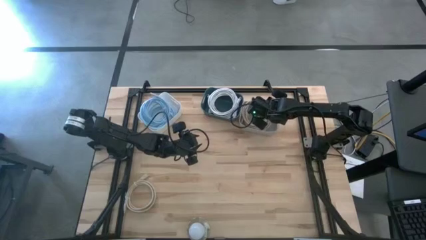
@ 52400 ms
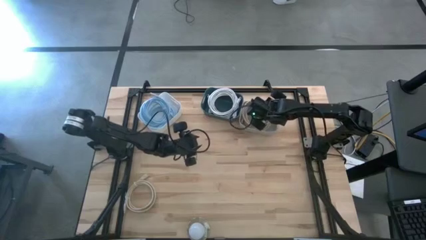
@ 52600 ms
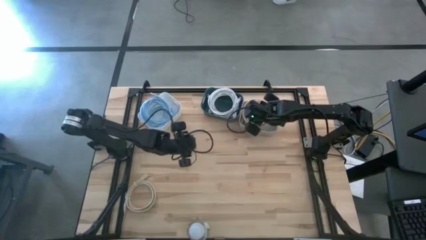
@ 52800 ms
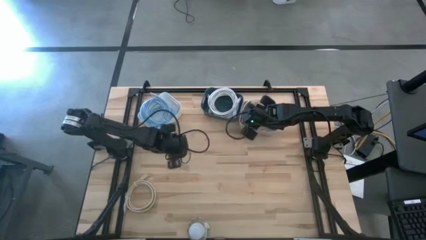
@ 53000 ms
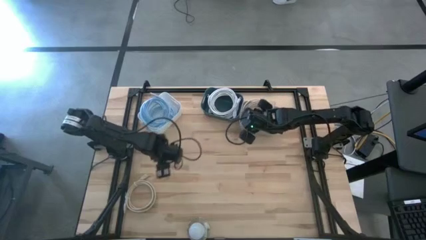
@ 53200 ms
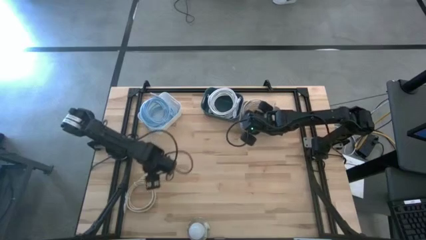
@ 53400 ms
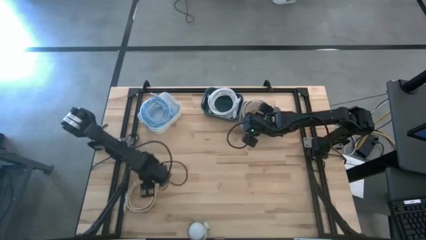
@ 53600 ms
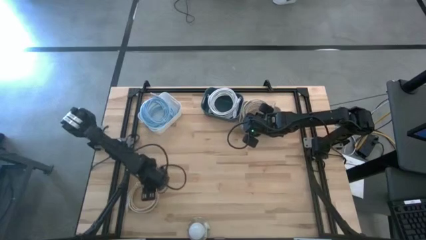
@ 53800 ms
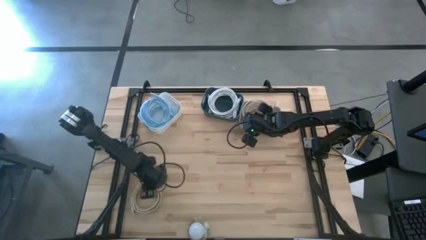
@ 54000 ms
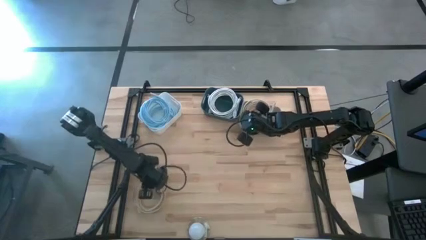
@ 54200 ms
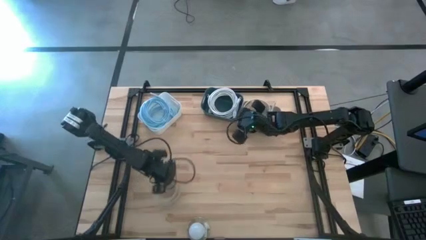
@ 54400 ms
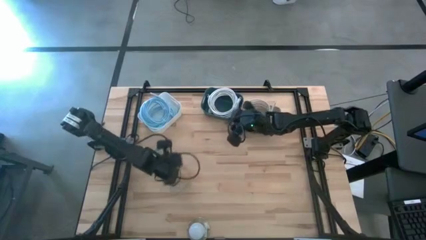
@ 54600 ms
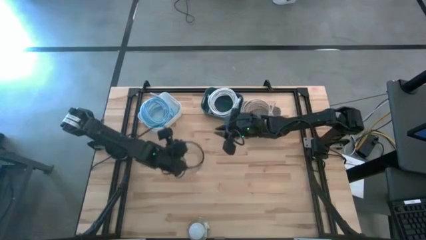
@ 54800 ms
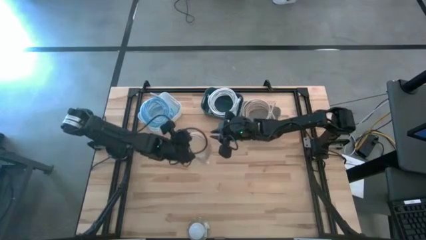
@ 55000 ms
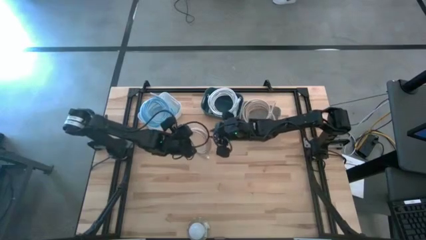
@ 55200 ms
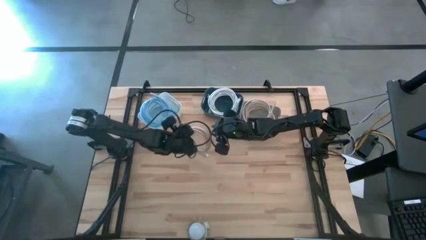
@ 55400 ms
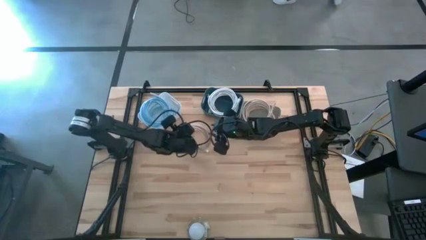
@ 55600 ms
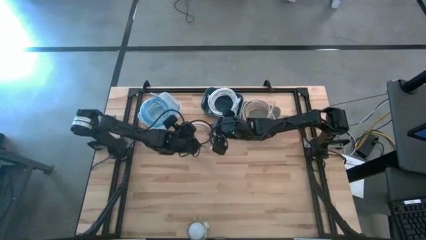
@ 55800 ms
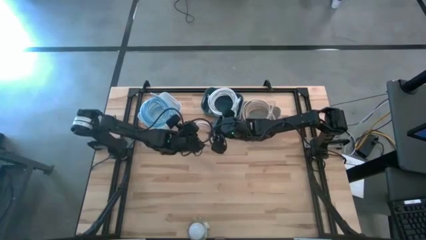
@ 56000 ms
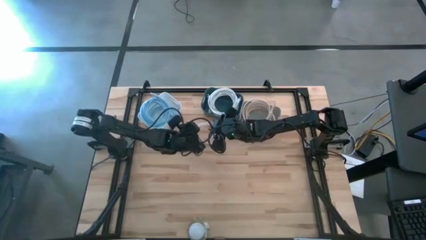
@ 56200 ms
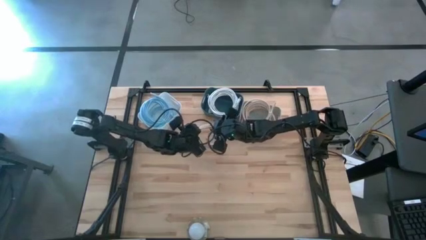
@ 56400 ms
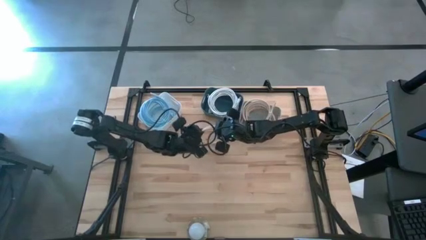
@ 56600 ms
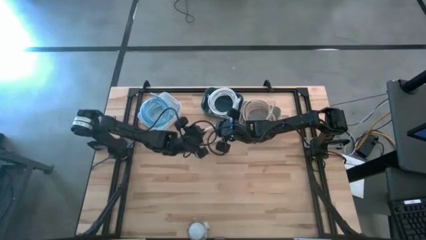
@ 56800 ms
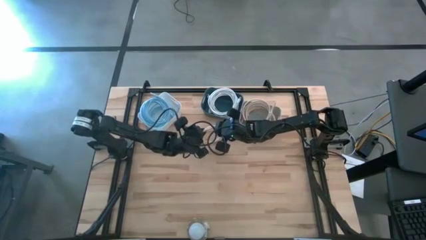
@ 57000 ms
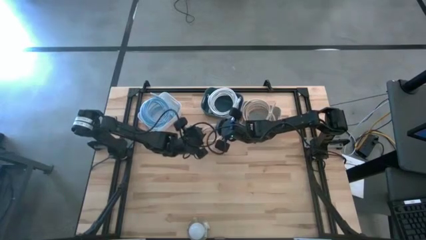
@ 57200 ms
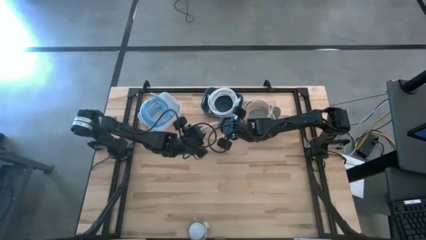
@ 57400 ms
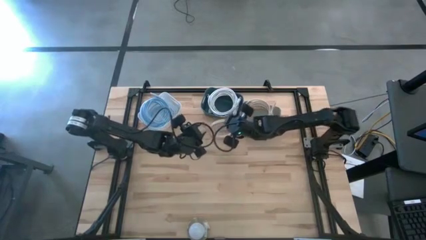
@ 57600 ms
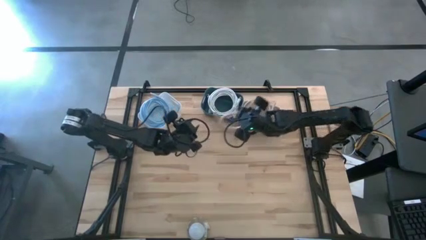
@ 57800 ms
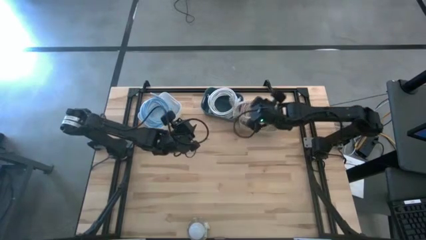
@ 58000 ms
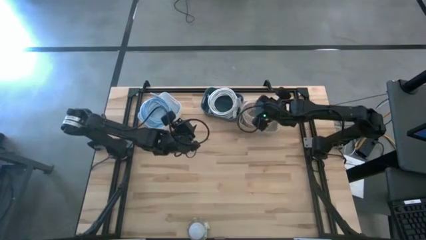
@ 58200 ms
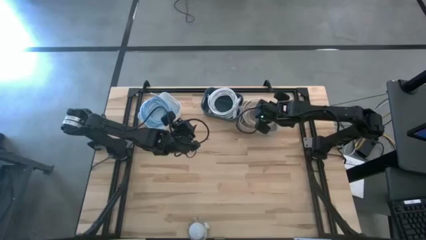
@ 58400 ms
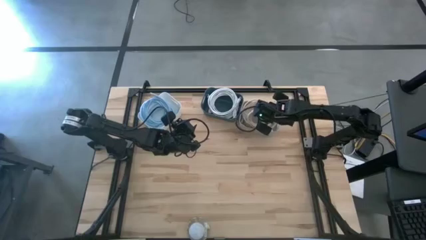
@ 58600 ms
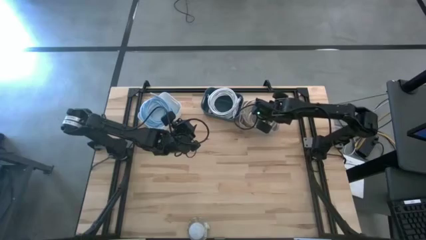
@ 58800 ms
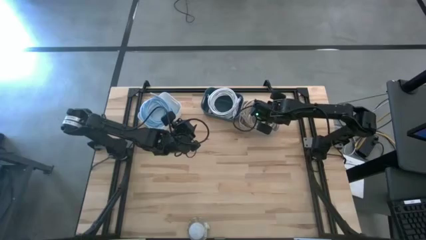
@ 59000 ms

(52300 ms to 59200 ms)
Task: Pick & Place USB Port
Put the brown charger cable into the brown bin

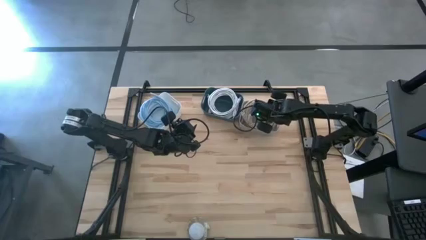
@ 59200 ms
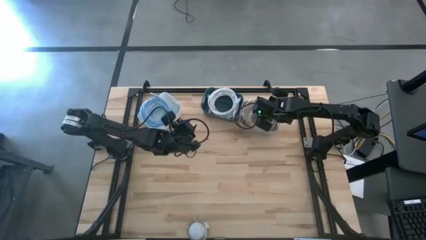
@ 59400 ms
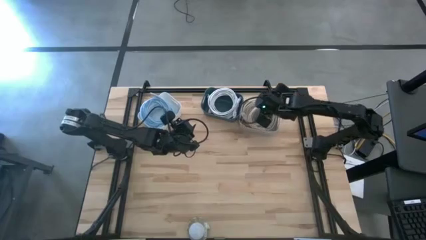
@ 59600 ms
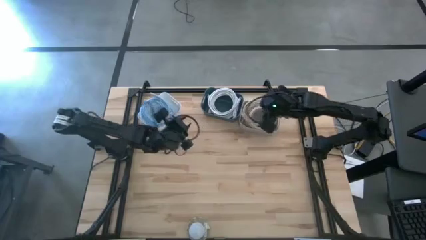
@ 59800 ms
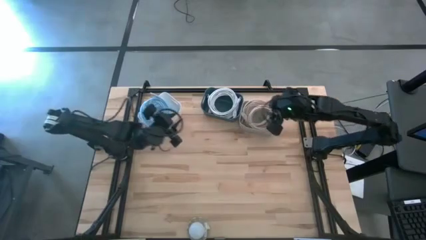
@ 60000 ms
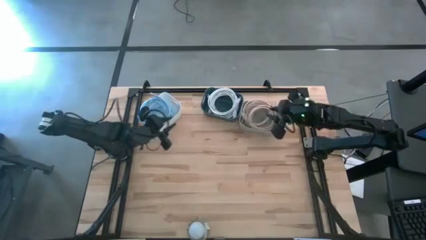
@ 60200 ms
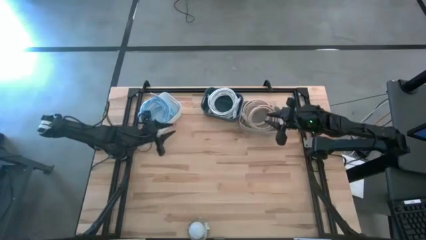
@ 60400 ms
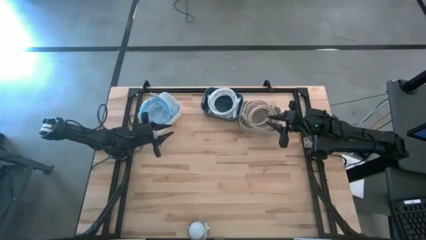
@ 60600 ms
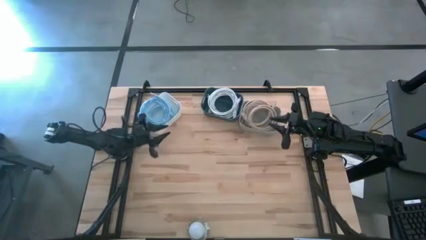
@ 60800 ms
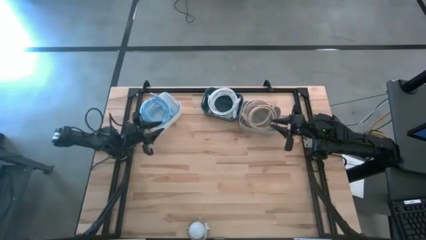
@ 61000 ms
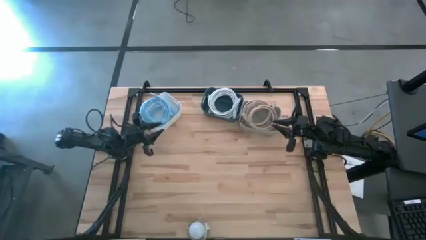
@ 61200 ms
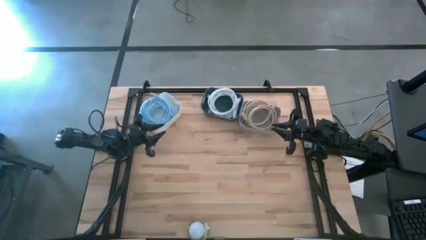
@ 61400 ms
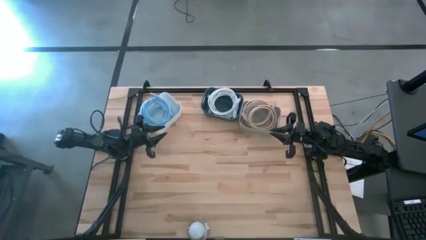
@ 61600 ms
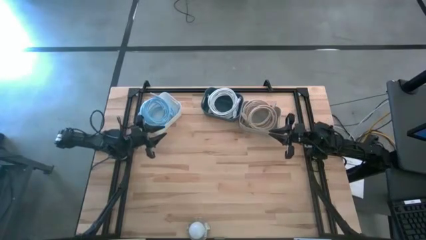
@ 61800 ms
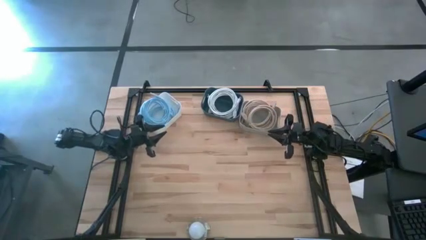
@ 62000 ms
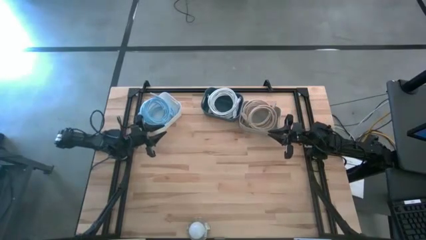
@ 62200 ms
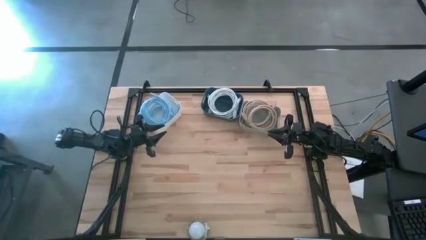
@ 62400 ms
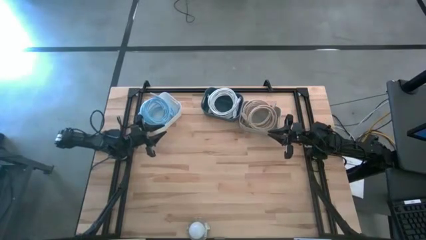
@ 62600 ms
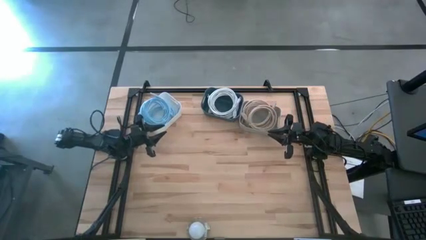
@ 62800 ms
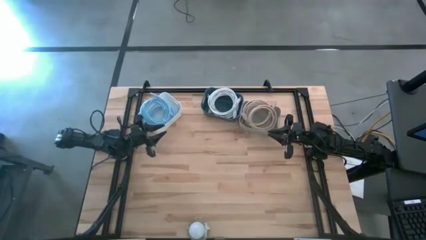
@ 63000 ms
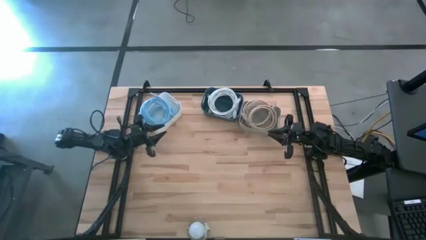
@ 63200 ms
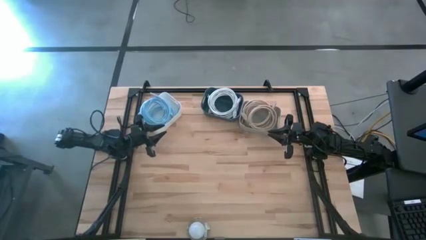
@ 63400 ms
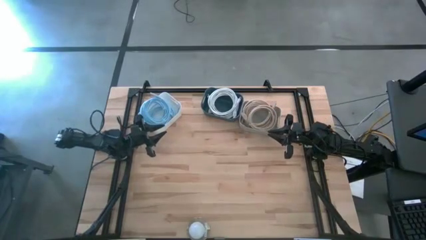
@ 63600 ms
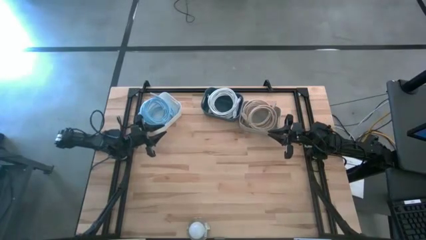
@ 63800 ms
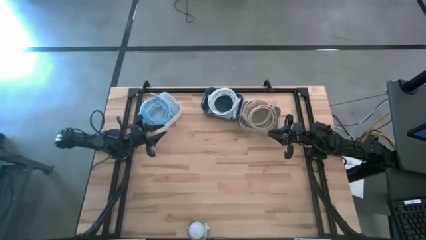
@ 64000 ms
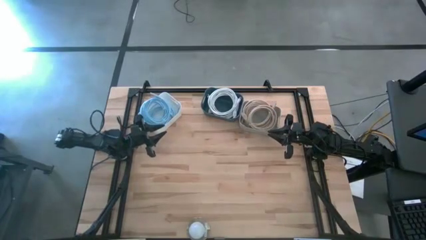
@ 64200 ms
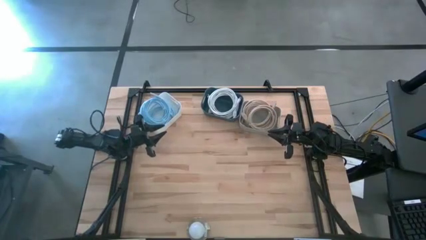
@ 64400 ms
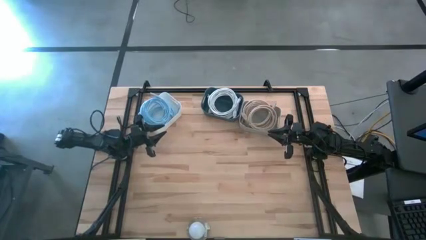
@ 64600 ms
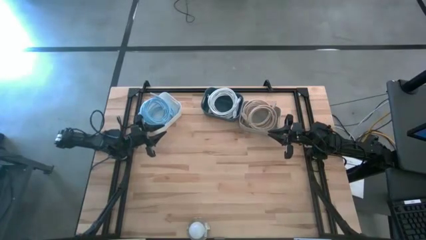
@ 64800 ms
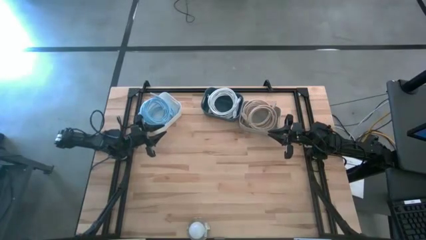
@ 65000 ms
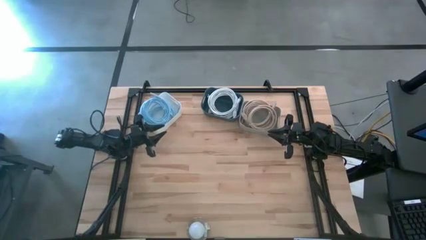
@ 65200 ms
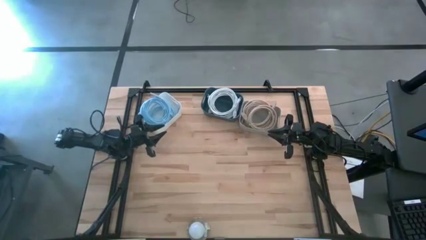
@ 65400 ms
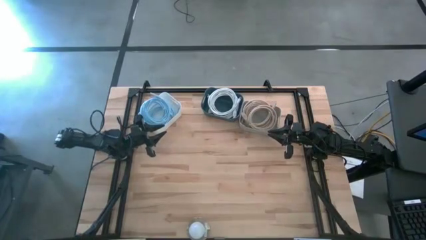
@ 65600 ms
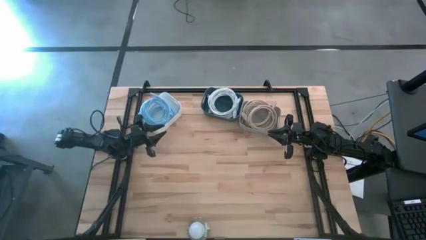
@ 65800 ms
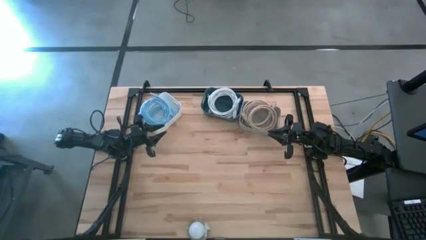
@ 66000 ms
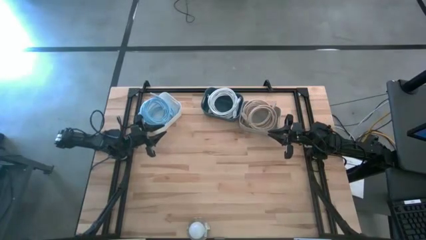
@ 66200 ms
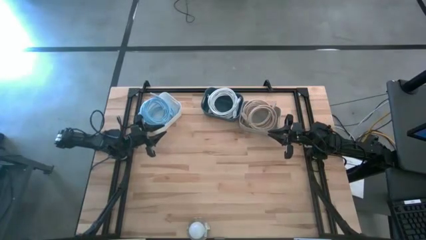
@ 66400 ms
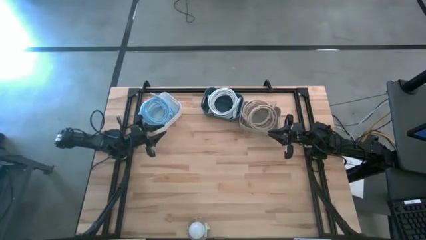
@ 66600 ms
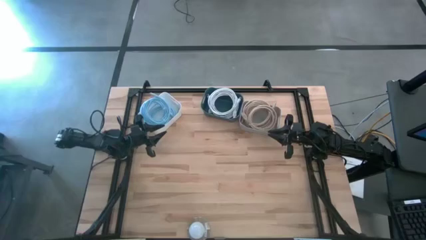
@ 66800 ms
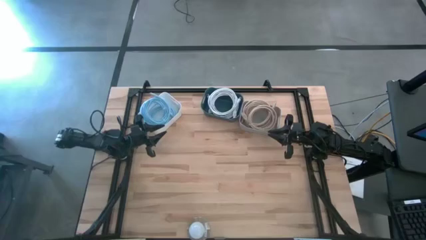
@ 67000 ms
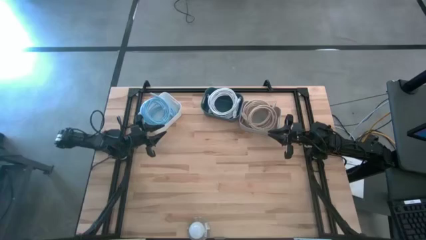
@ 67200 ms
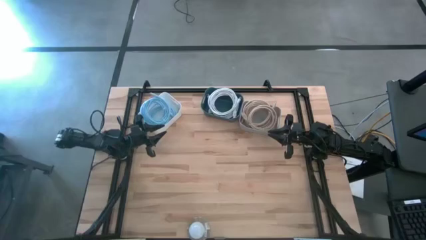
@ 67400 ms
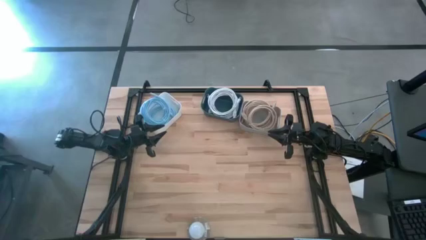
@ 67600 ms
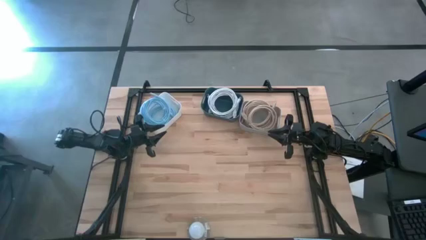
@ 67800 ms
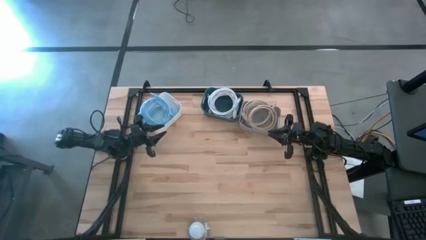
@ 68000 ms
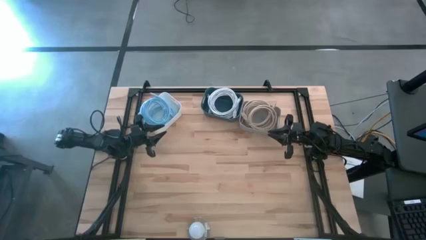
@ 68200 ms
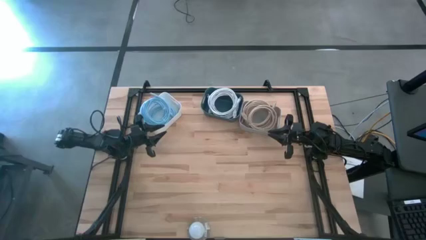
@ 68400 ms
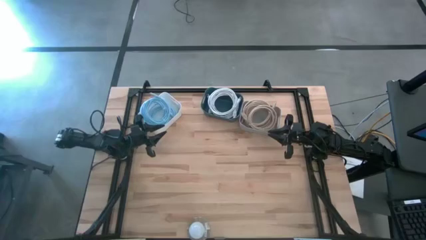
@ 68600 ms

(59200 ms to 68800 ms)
Return to Home Position

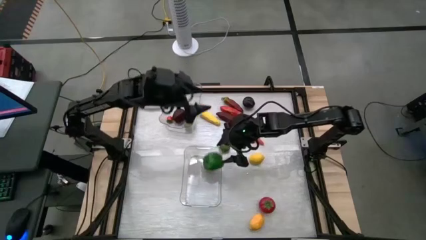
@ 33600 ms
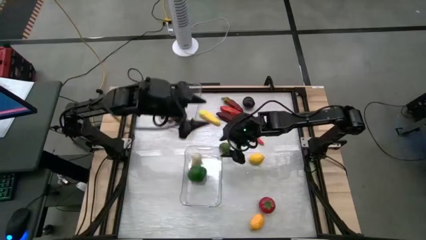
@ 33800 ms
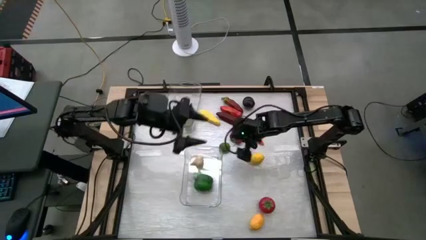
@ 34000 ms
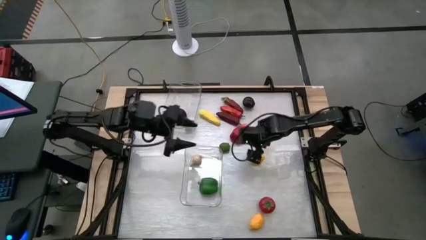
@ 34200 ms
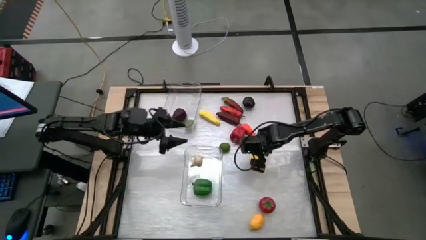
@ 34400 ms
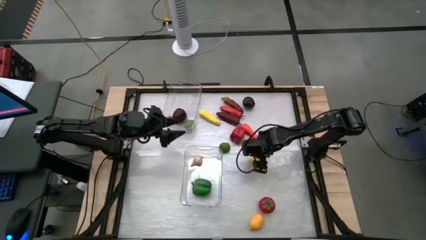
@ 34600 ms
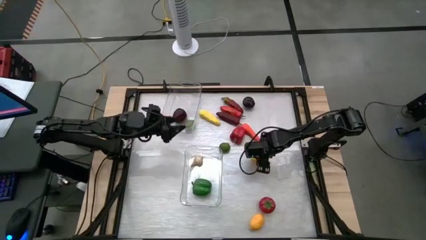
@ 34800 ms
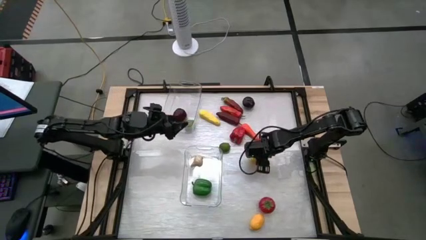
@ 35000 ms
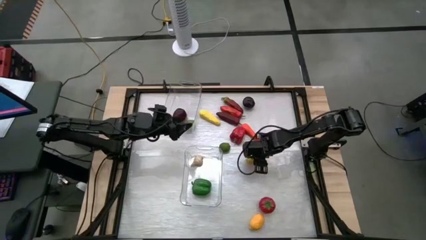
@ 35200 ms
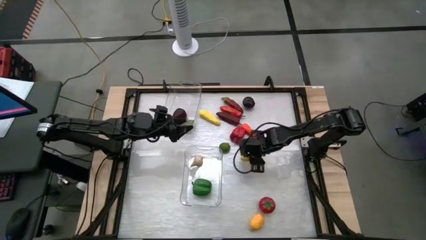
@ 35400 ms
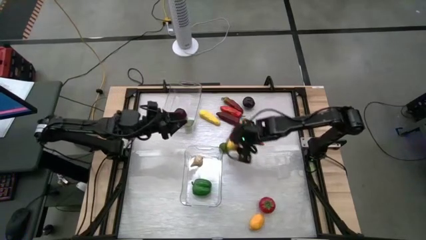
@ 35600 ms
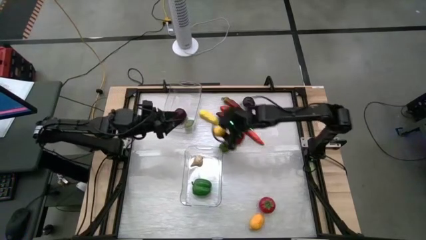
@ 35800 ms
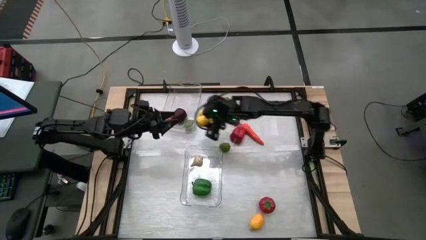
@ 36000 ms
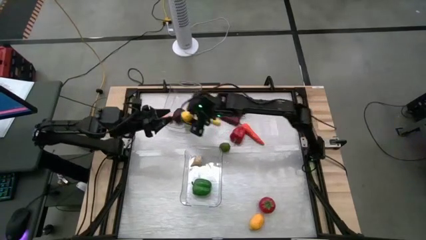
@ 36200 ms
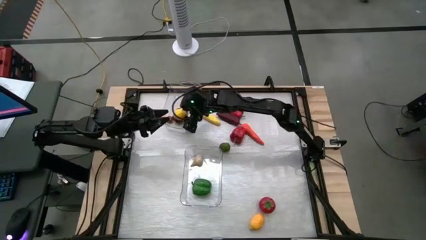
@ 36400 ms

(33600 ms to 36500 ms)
Task: Sort produce into baskets
Put the top yellow lemon into the top transparent bin
